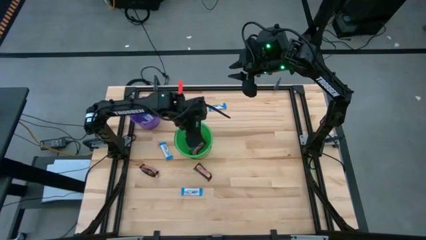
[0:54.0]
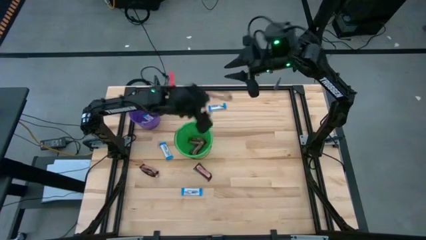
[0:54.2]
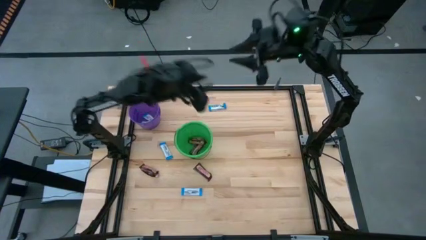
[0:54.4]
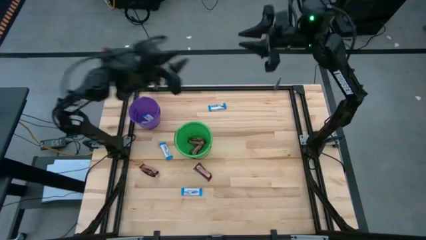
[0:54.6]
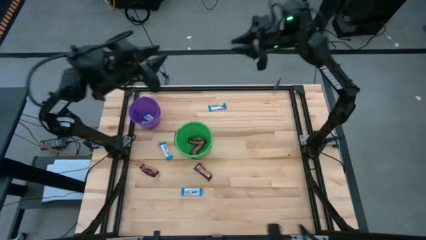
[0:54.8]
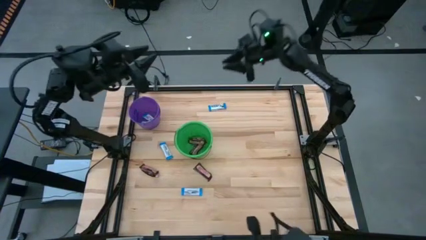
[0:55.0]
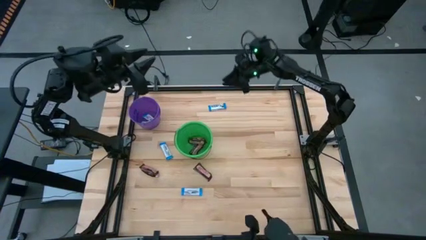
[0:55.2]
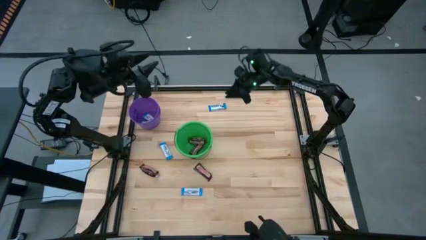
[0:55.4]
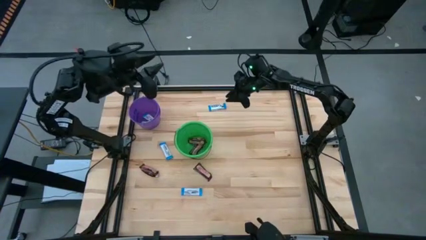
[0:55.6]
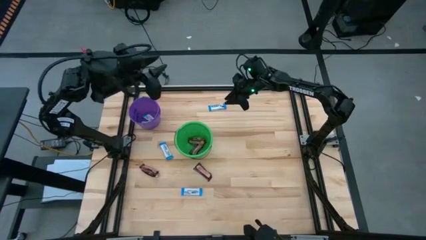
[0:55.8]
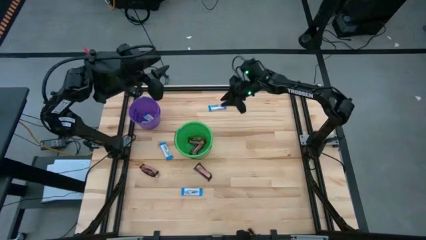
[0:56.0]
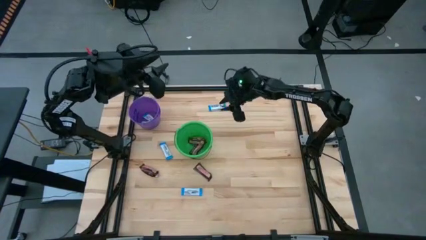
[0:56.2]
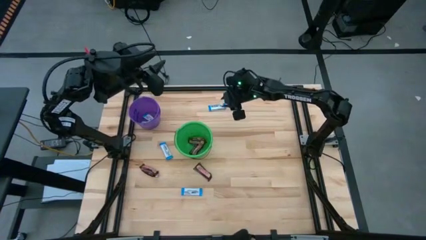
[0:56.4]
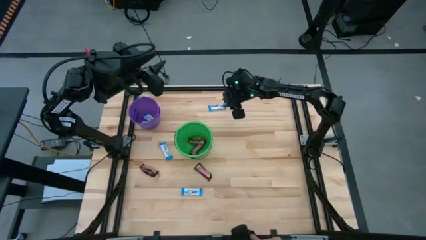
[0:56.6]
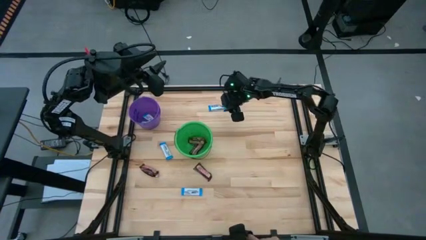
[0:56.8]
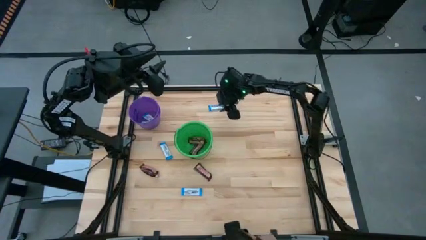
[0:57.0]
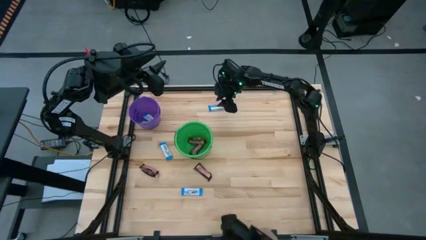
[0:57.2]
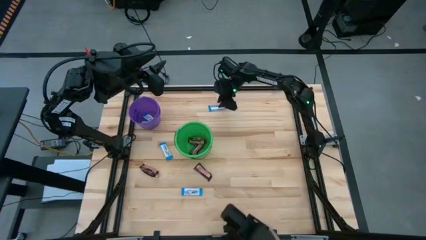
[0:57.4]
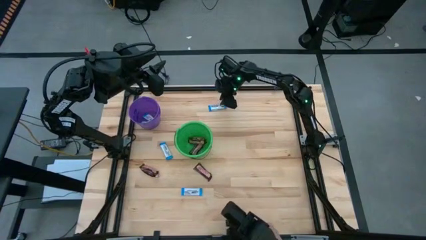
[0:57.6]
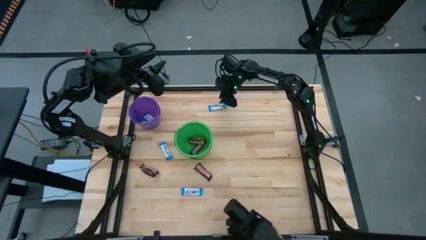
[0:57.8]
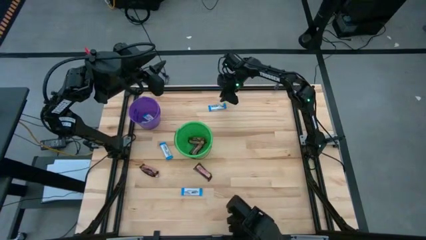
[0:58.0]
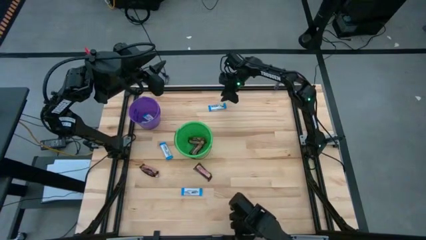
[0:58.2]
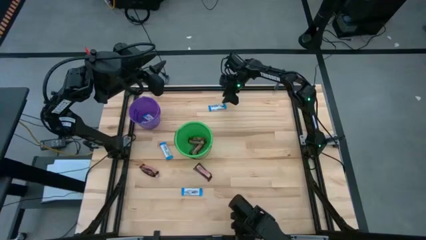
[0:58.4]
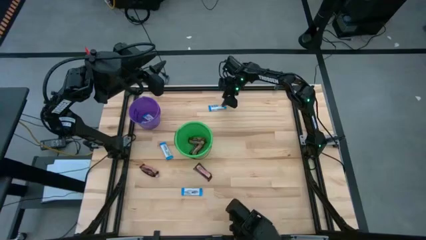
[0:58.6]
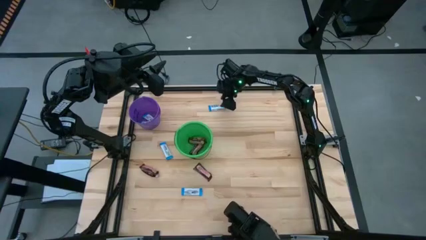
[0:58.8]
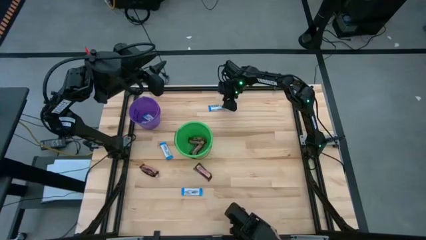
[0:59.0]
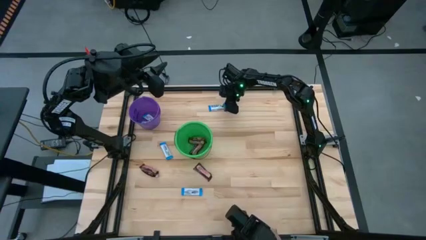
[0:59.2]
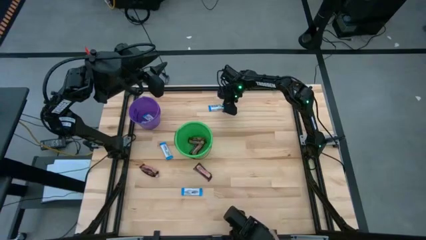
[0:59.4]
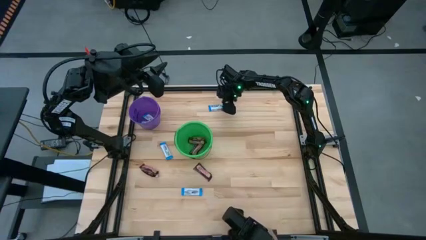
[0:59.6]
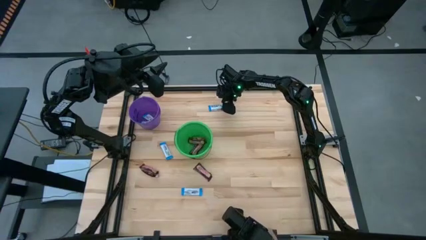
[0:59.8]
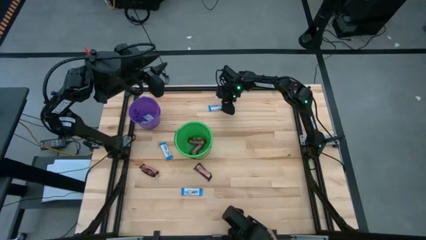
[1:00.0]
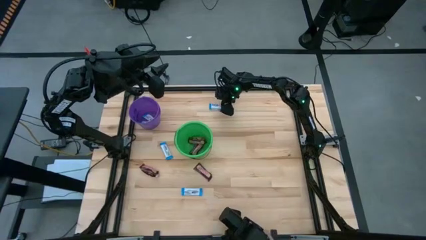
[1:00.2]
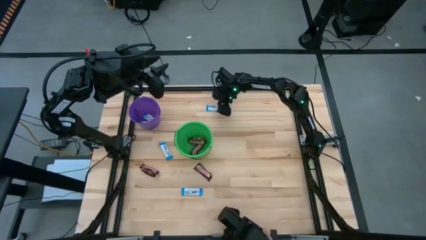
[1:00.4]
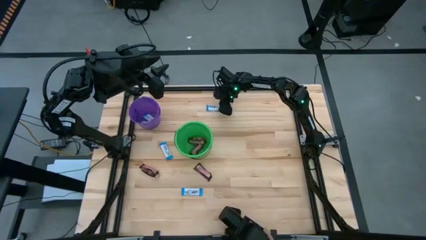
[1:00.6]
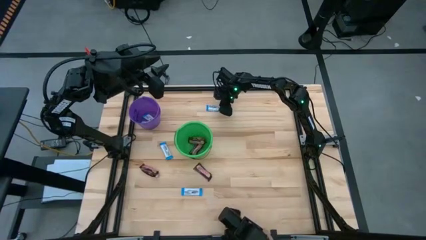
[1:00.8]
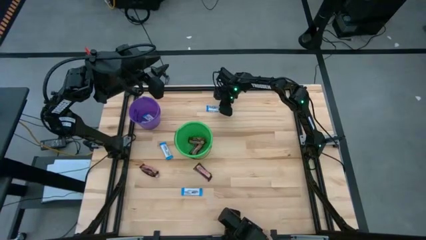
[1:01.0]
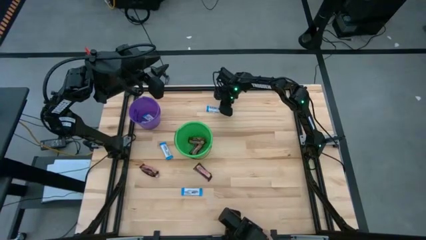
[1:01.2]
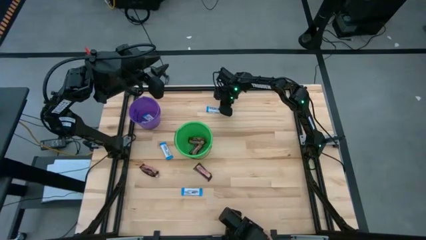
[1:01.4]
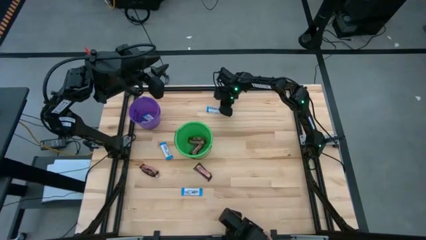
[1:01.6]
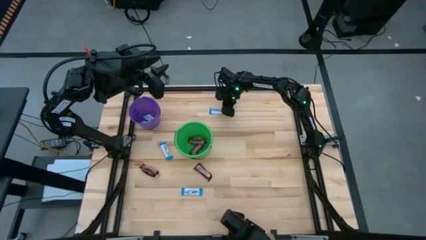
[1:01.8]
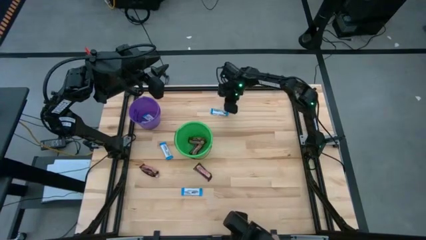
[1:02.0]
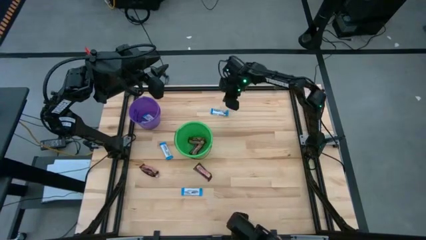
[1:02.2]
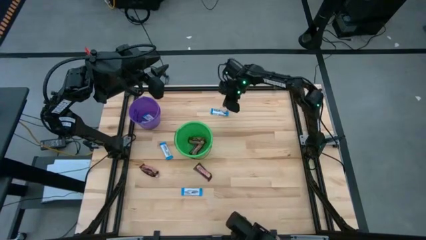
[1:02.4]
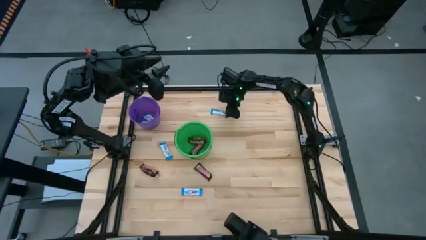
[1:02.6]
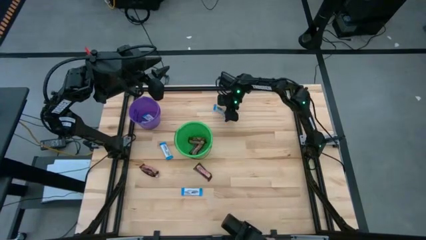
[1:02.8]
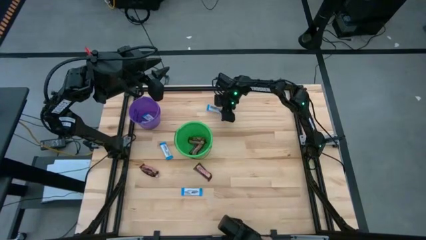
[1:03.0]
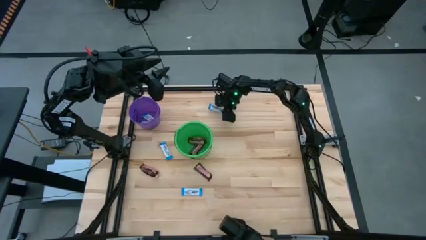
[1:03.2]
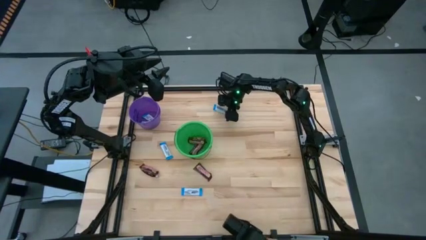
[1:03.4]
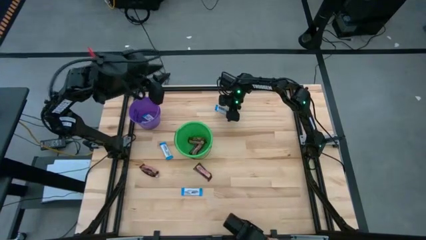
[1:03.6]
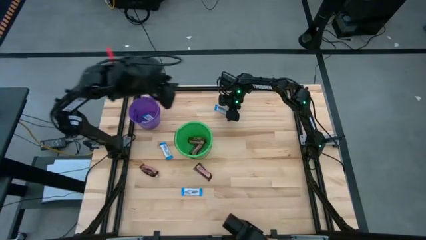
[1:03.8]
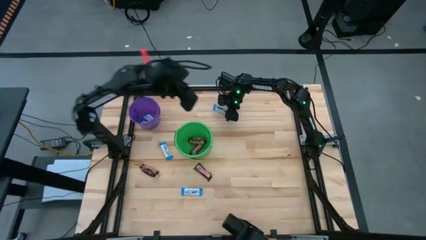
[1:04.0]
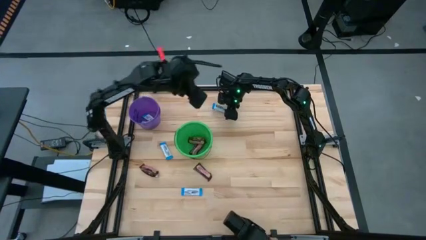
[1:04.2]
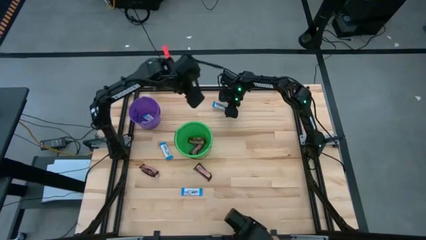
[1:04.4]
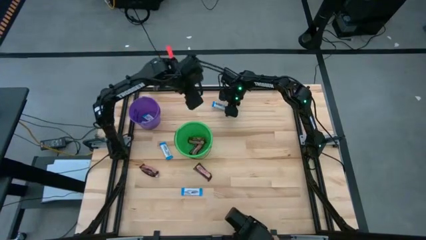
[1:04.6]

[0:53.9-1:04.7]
Task: Sort candy by brand, put in halloween buckets
Put the white chocolate bar into the violet bucket

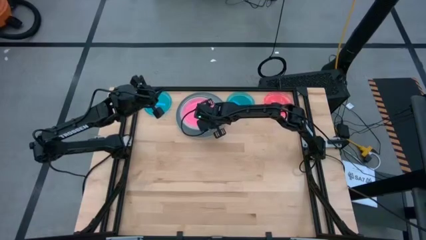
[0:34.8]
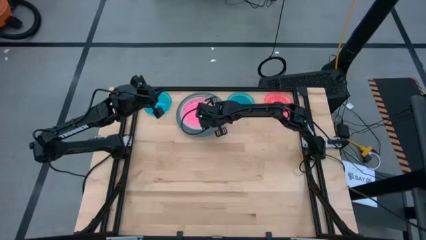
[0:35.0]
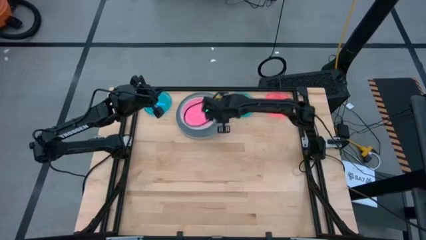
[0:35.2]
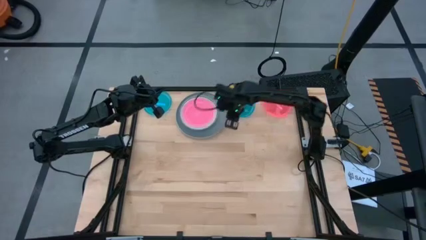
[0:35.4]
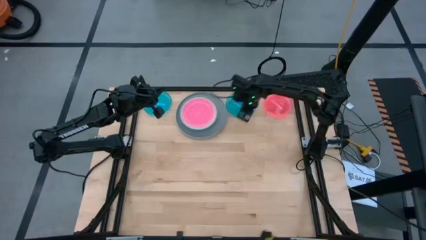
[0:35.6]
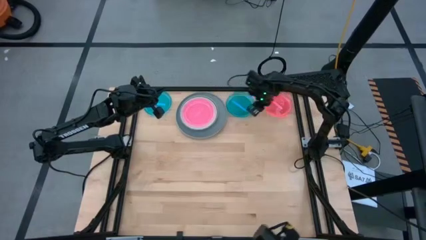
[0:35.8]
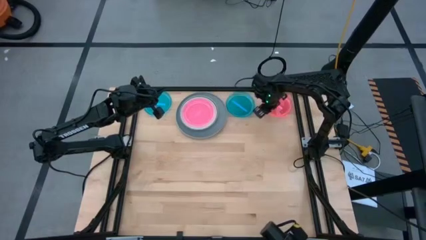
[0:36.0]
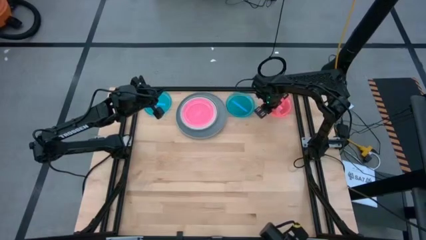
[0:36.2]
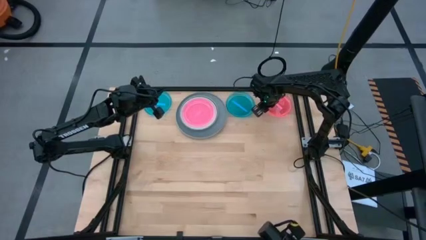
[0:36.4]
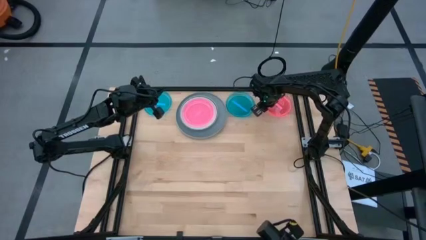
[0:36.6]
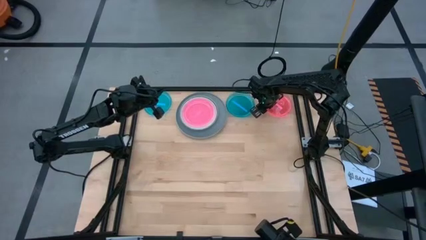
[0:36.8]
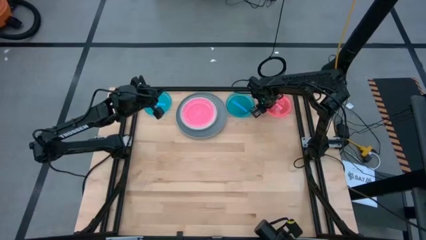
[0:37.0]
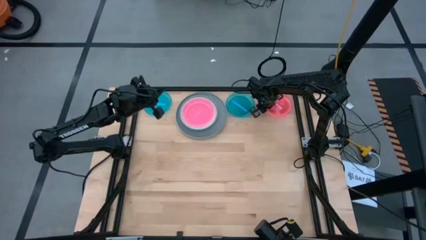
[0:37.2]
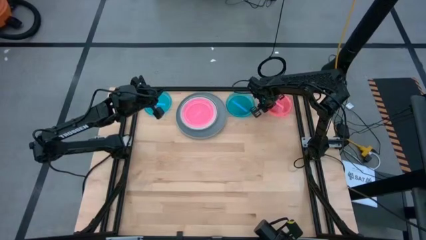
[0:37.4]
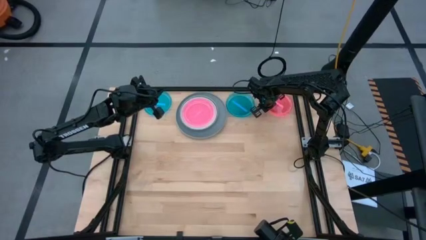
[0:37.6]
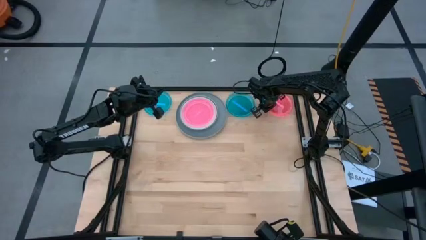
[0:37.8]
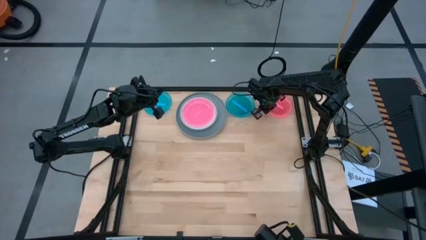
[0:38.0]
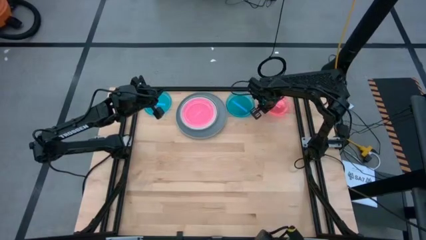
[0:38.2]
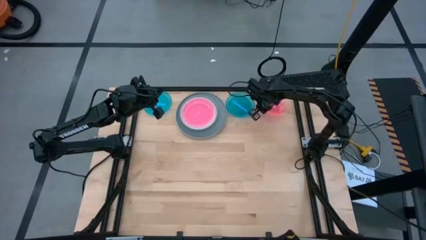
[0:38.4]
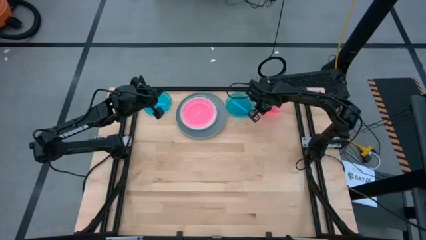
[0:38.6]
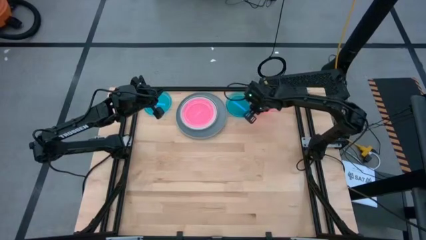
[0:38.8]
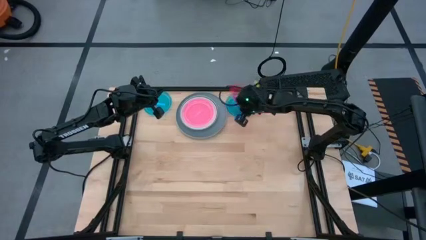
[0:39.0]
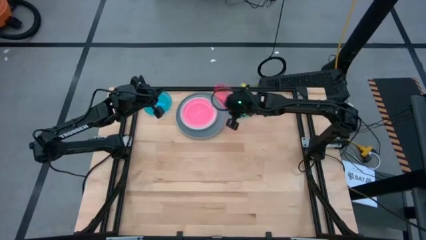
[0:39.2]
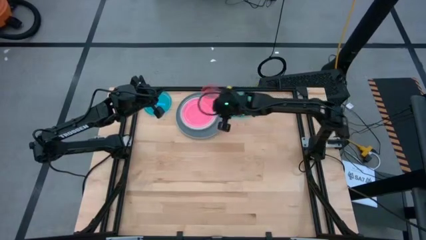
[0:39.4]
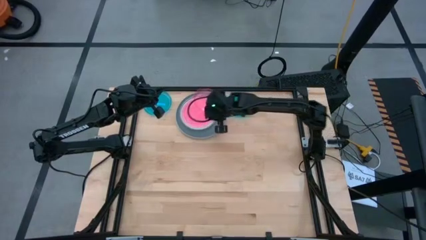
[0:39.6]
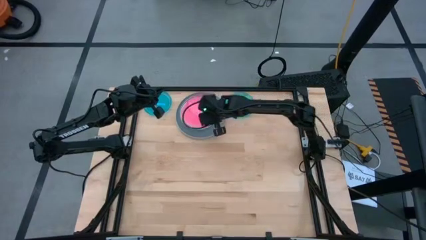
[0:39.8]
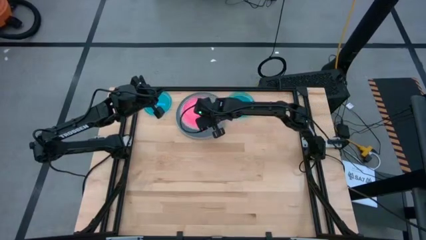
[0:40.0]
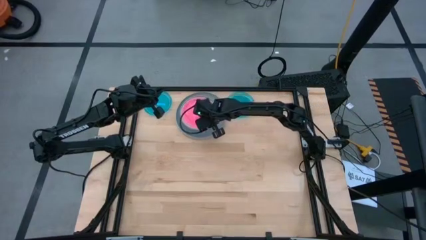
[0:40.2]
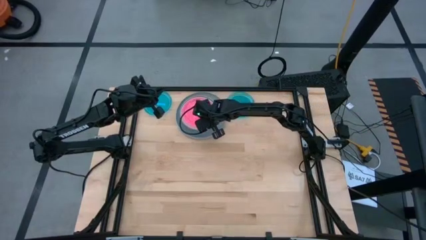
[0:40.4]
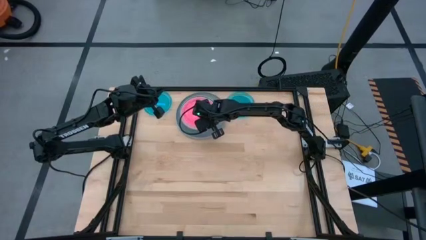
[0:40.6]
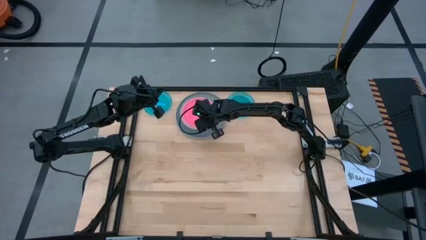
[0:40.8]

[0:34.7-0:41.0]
Task: Stack plastic plates
Stack the pink plate on top of the pink plate
